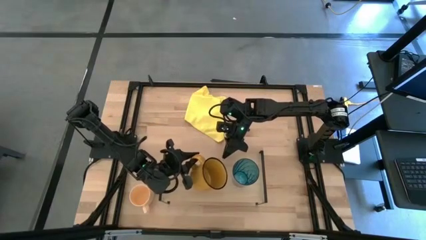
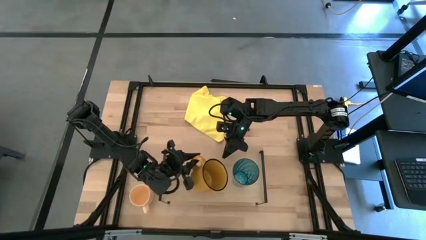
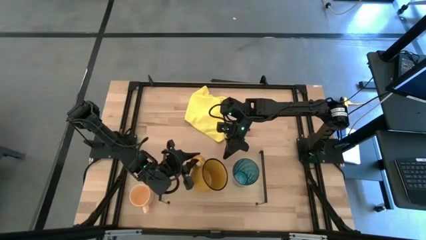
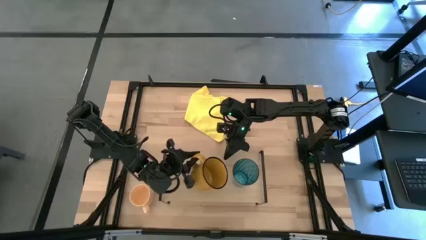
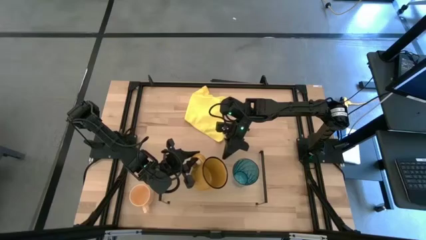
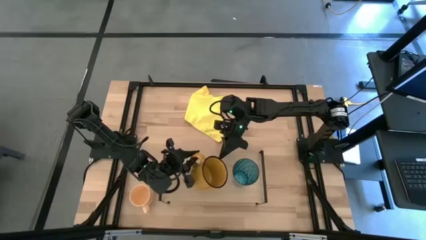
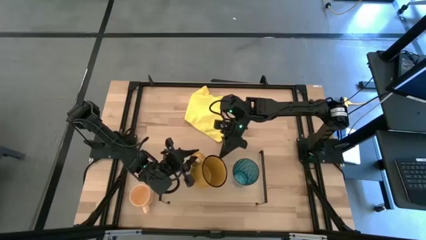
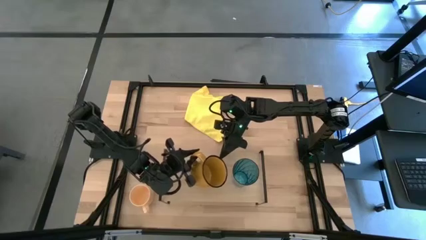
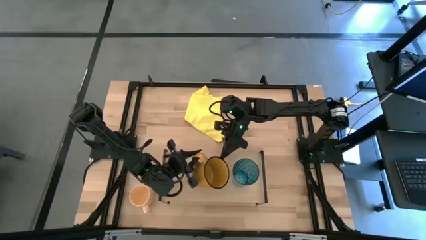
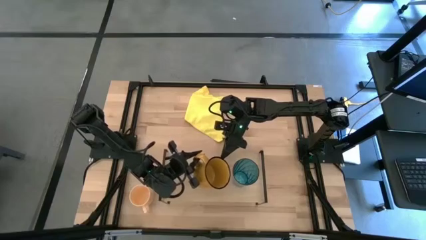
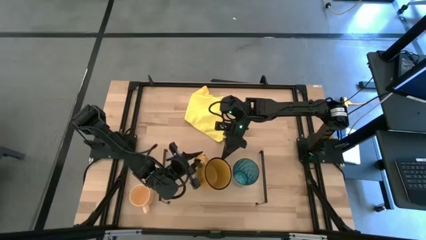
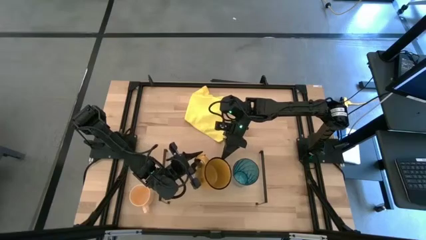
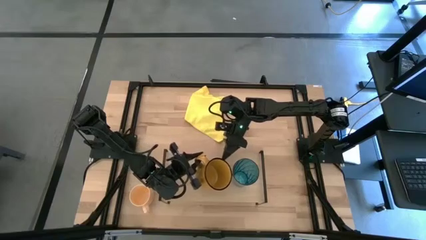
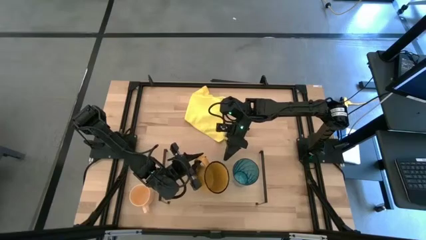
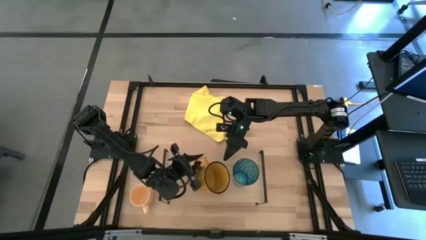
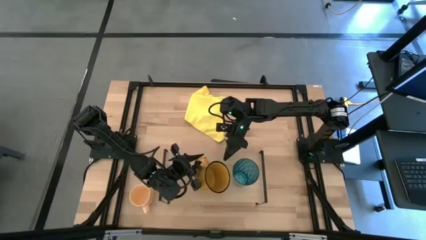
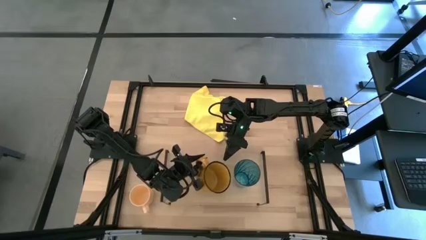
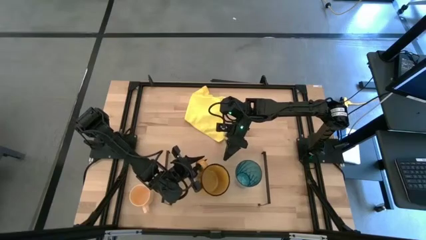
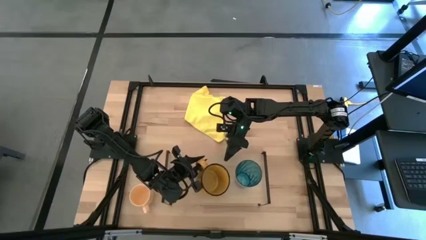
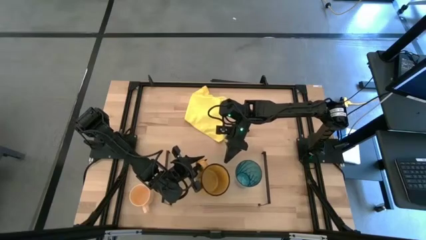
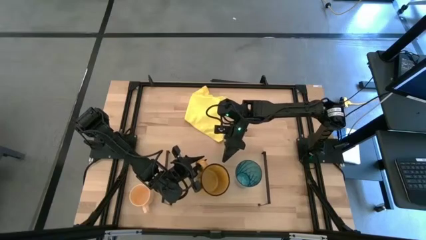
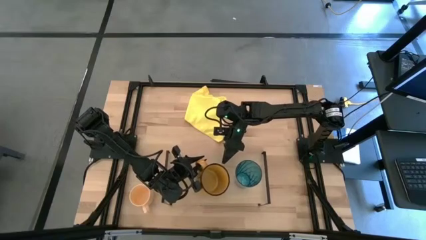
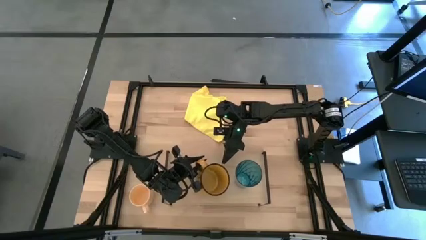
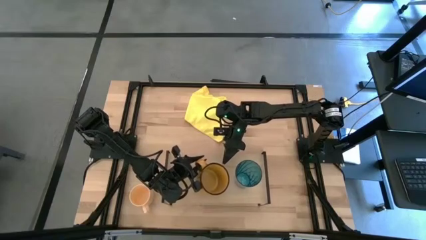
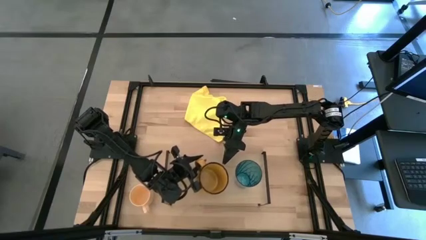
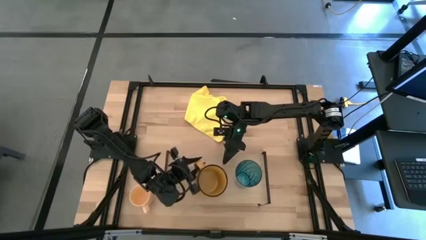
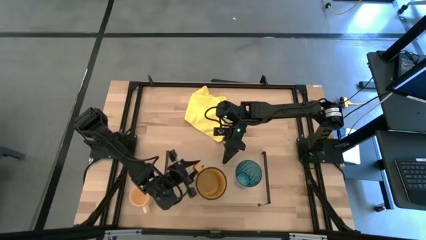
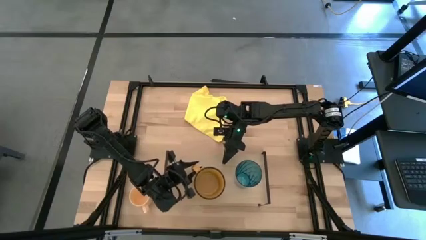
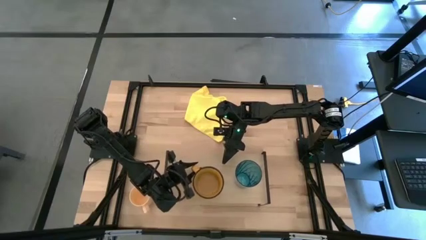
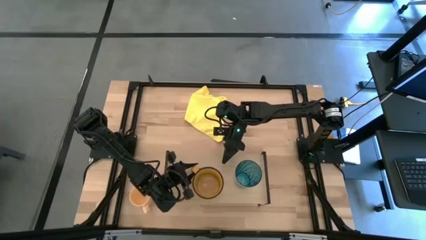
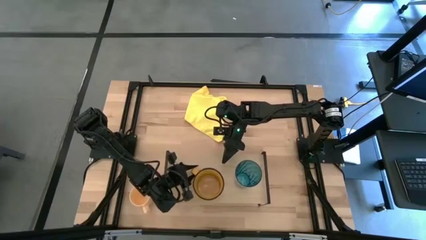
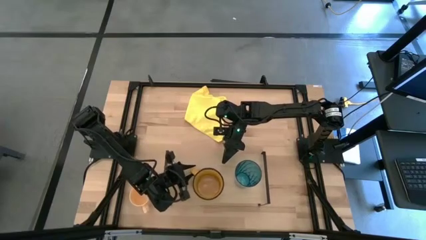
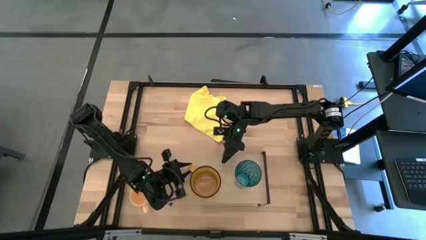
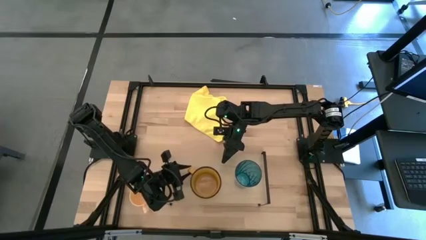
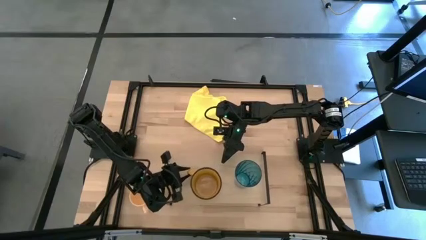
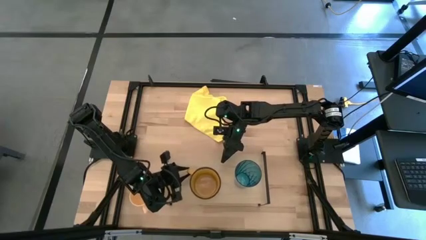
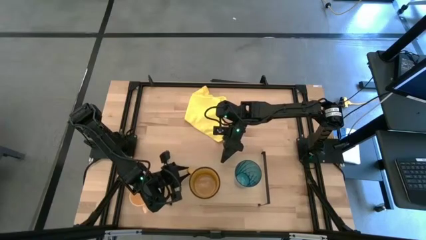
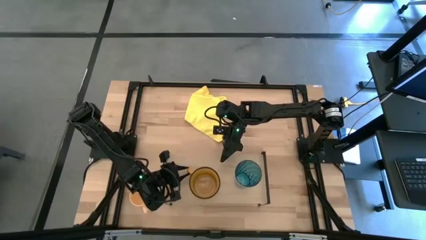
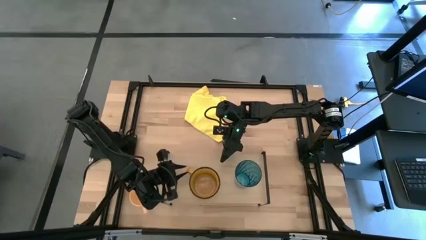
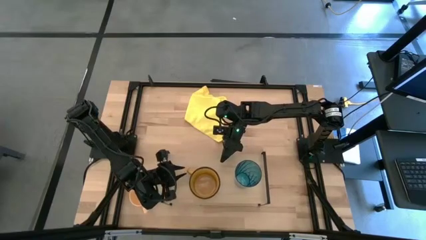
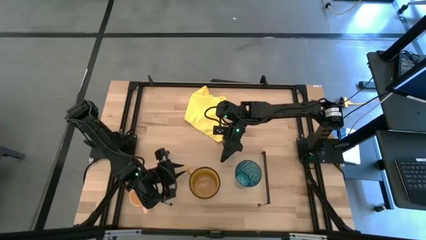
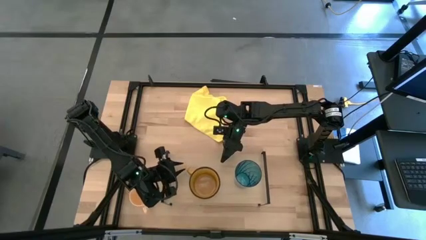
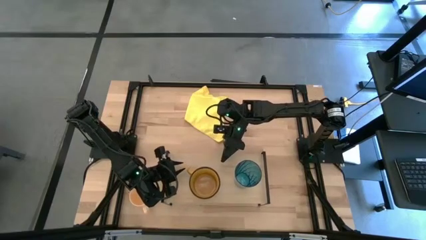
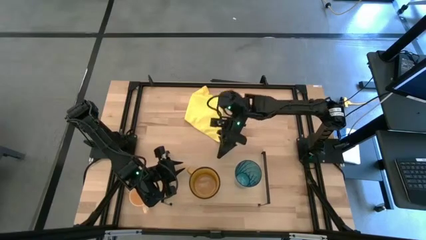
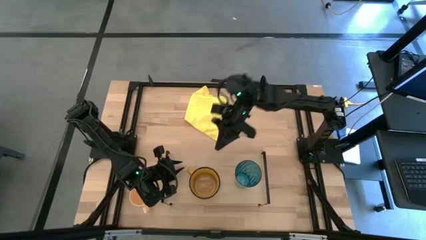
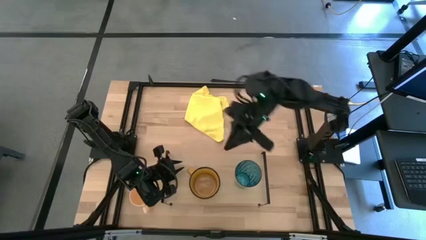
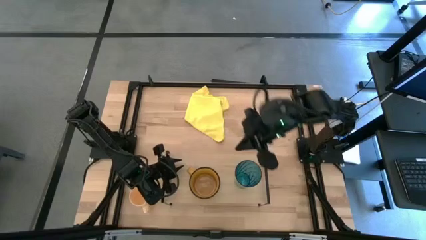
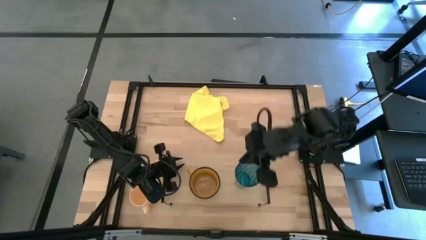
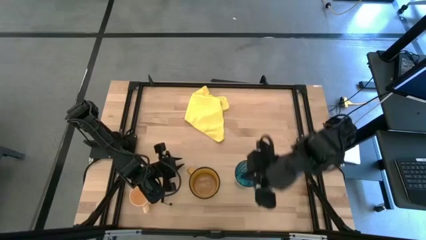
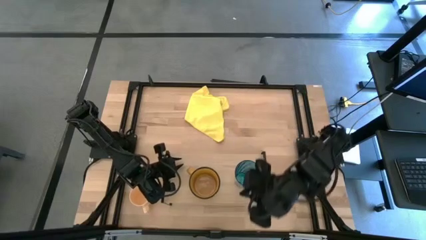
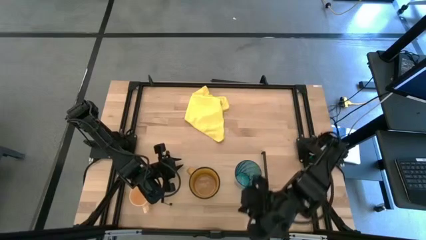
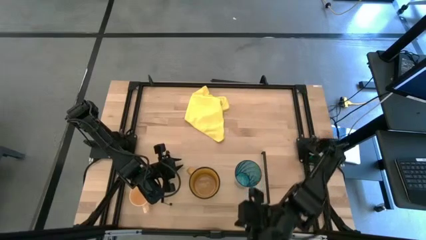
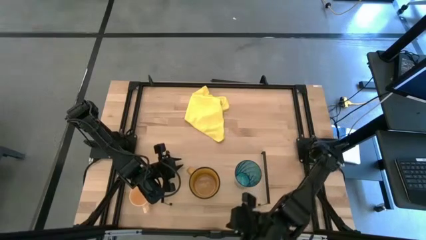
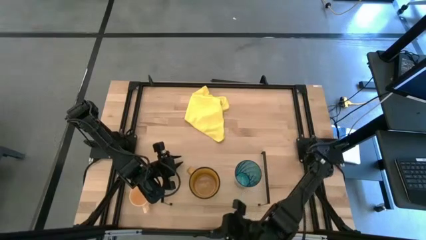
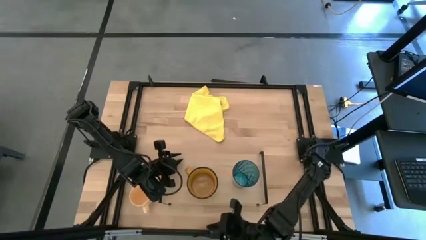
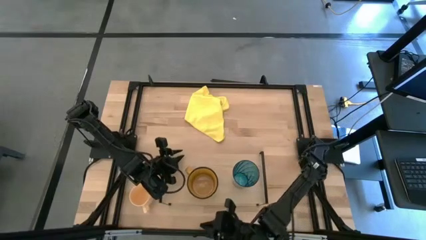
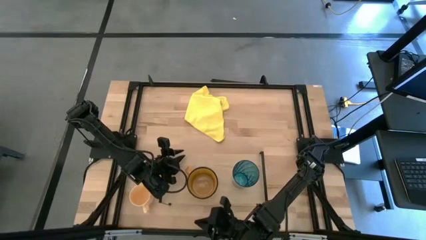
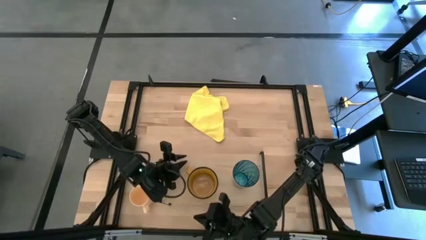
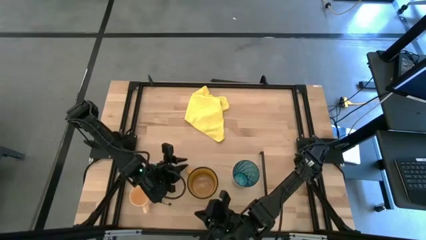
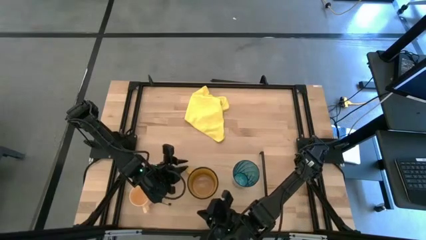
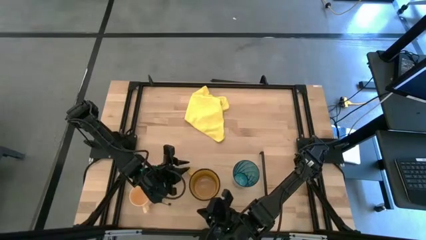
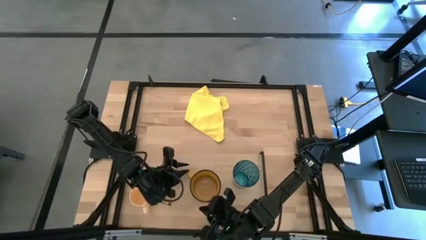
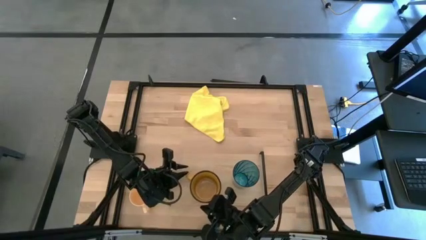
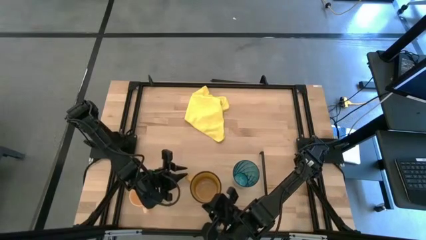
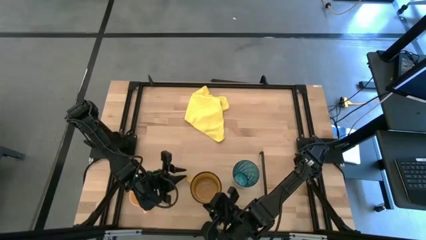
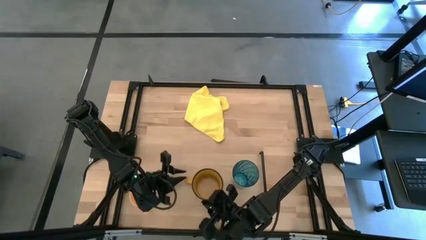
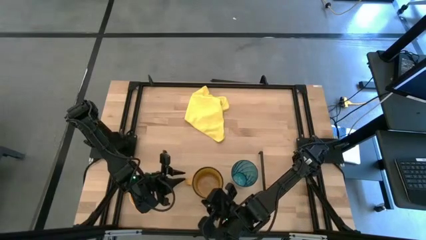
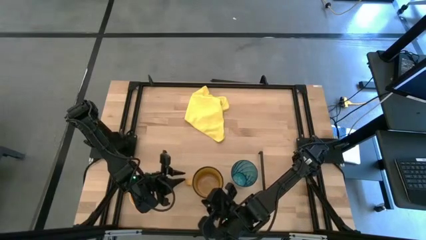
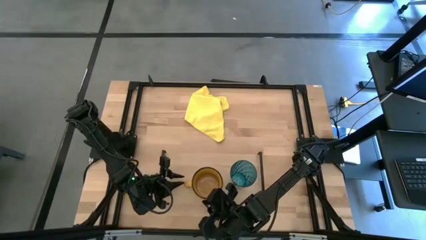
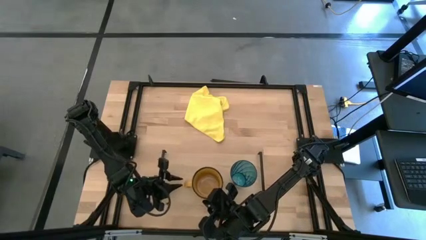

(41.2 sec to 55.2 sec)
Task: Stack small to large cups/mugs on shelf
Put the brown mug on the shelf

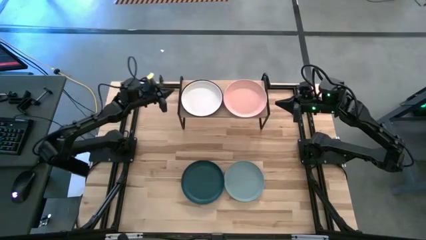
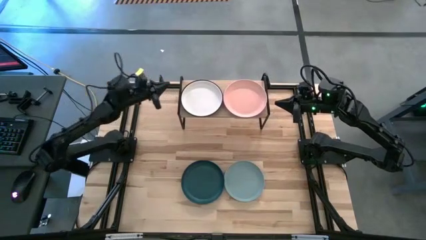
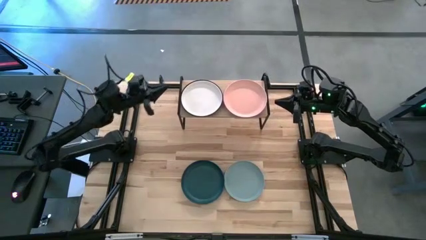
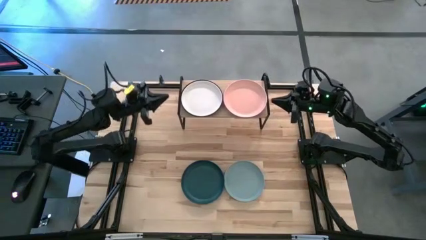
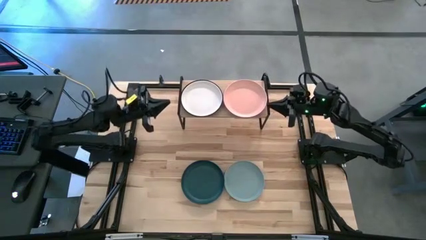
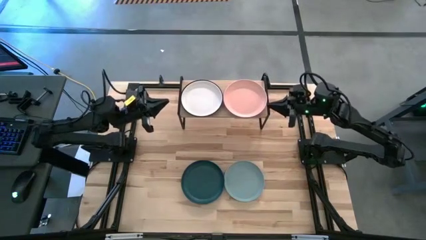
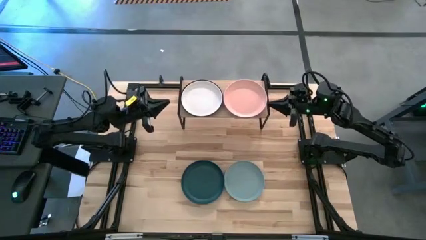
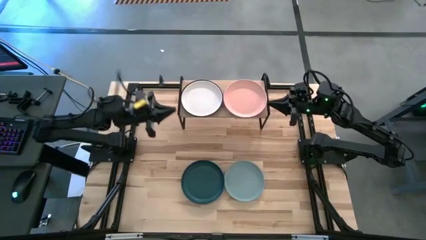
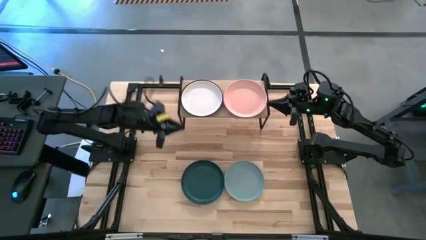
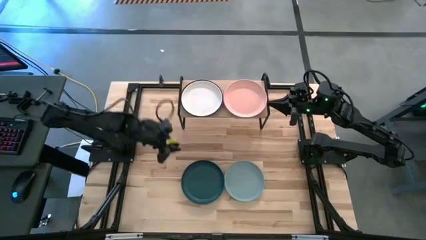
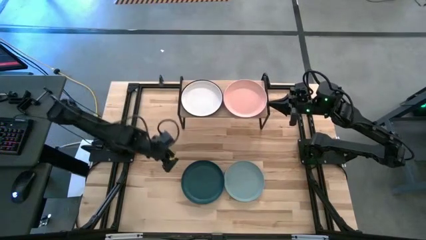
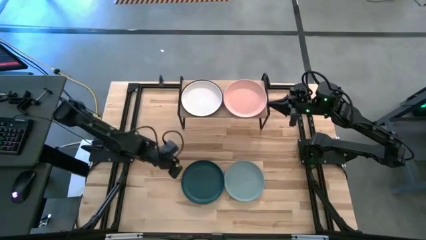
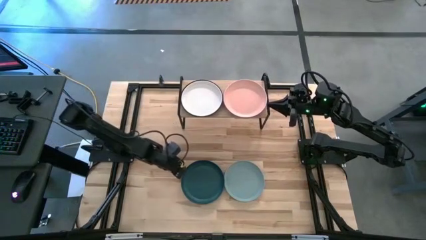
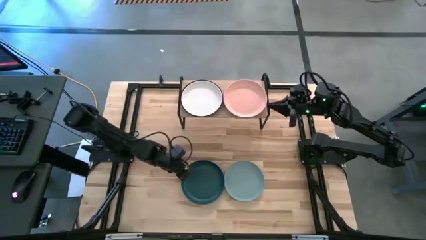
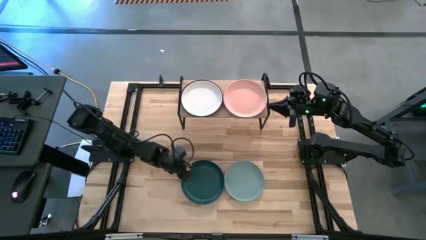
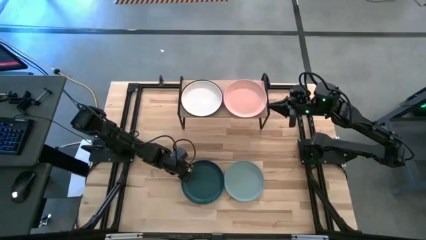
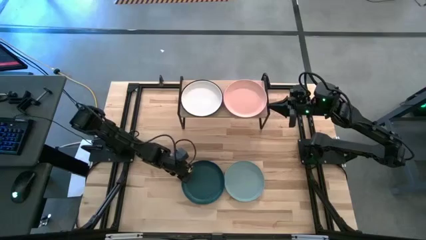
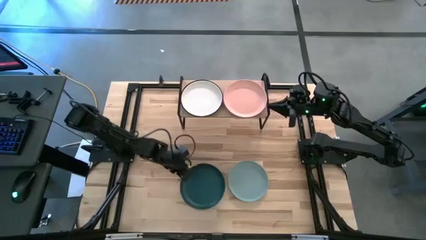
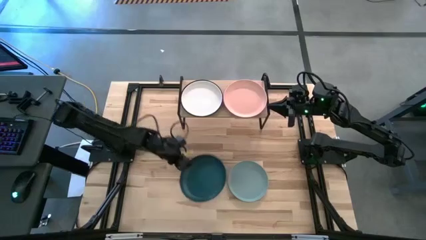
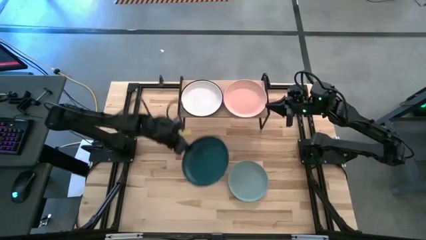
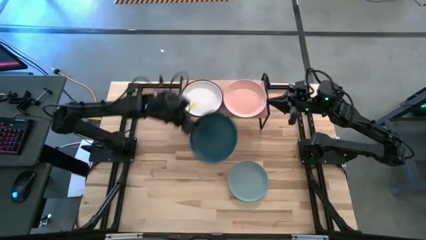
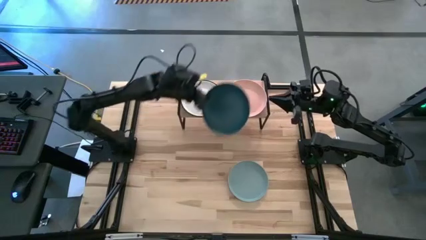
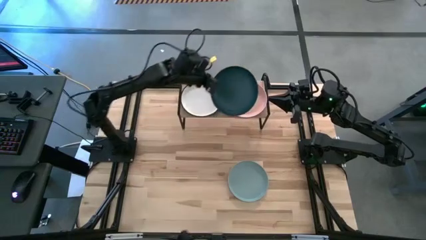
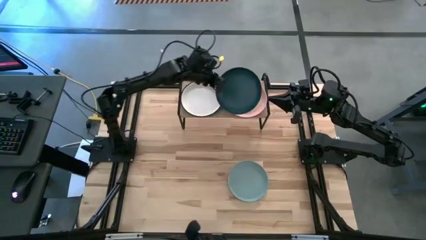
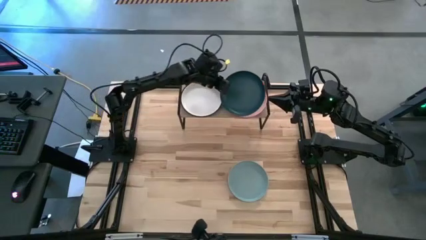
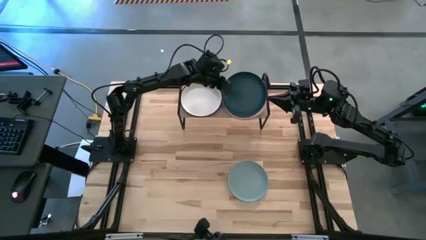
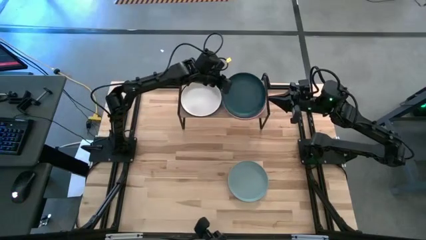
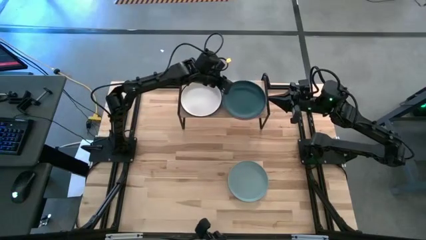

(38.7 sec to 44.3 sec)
Task: Place and stack plates onto a shelf
Stack the green plate on top of the light orange plate on the shelf
